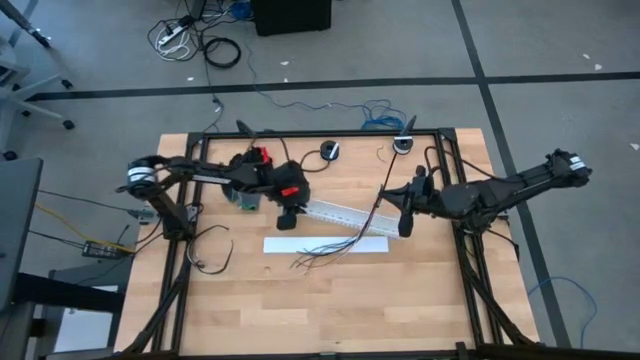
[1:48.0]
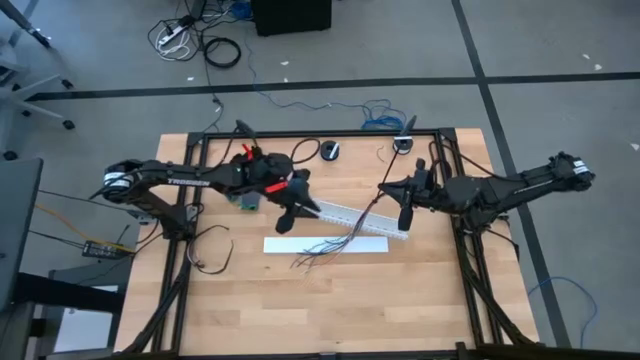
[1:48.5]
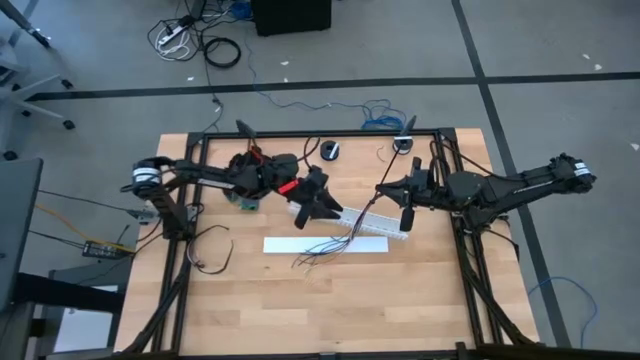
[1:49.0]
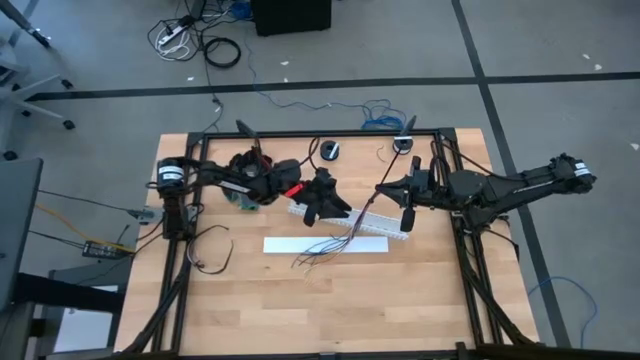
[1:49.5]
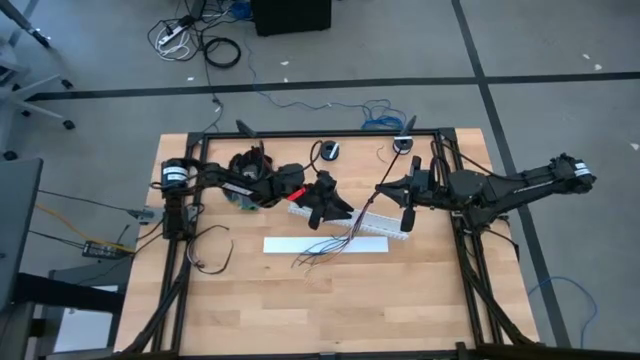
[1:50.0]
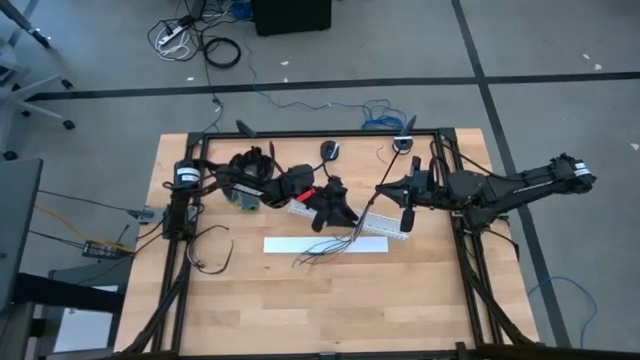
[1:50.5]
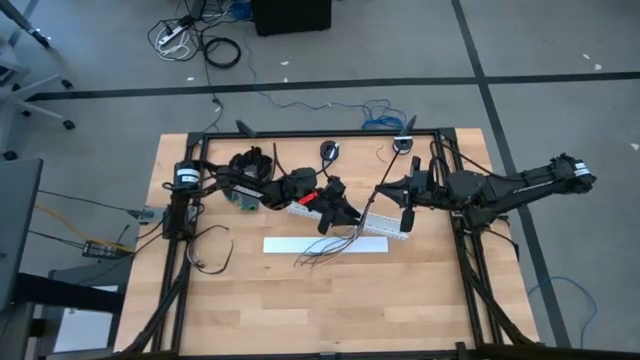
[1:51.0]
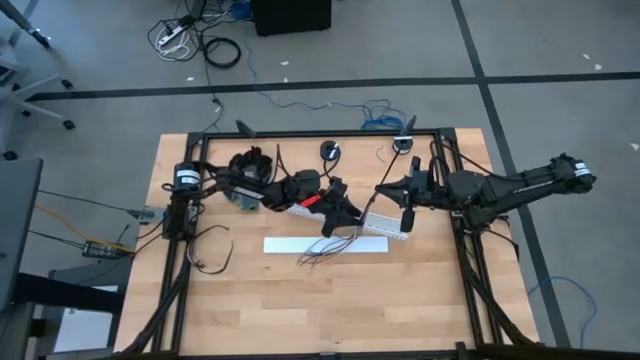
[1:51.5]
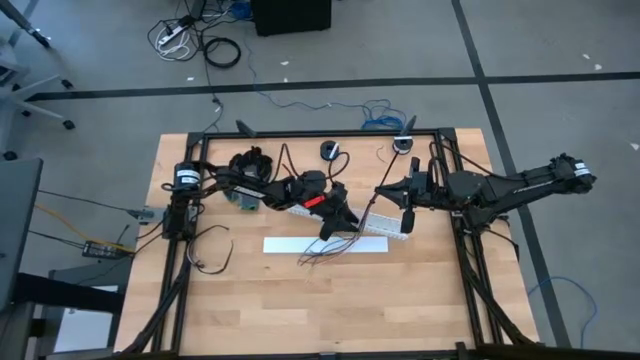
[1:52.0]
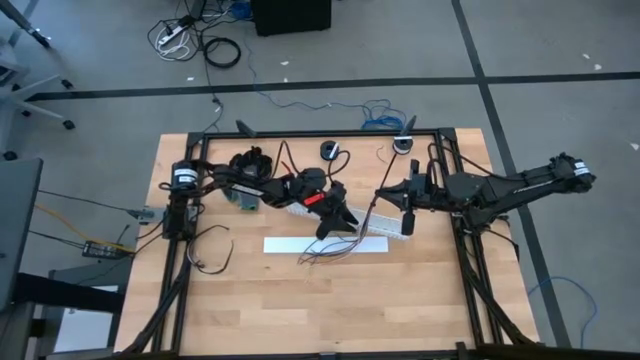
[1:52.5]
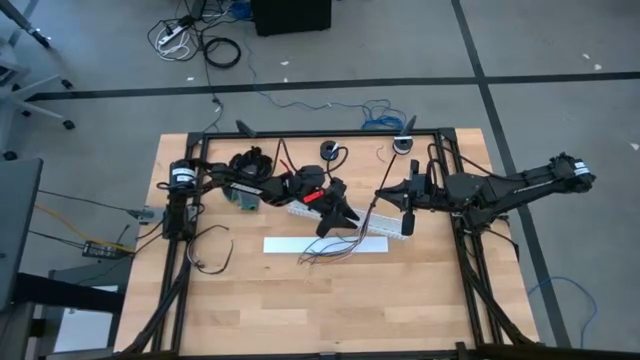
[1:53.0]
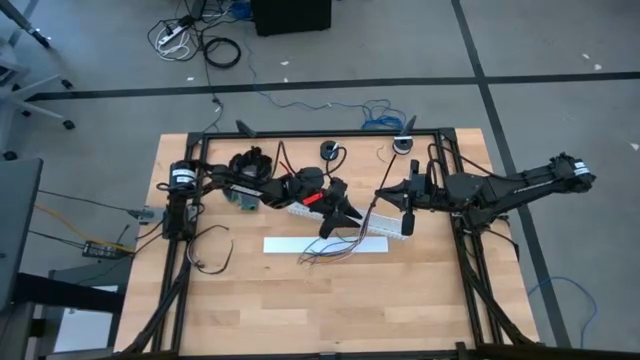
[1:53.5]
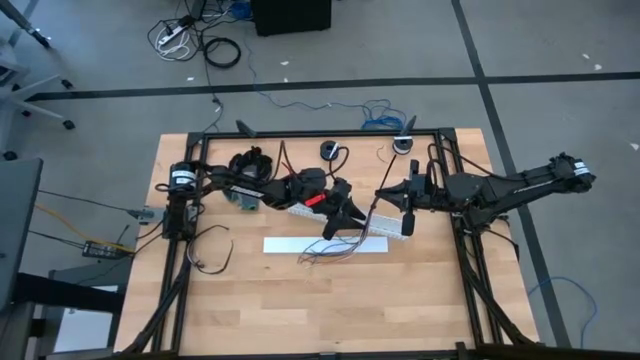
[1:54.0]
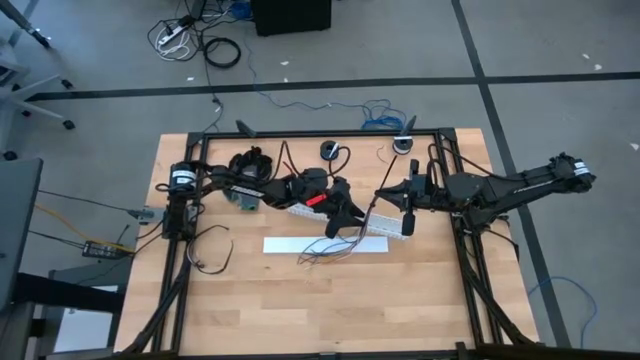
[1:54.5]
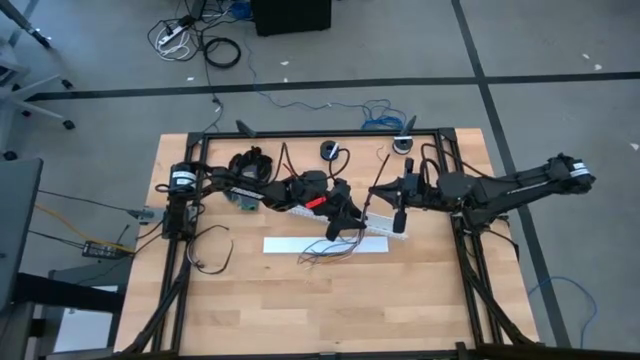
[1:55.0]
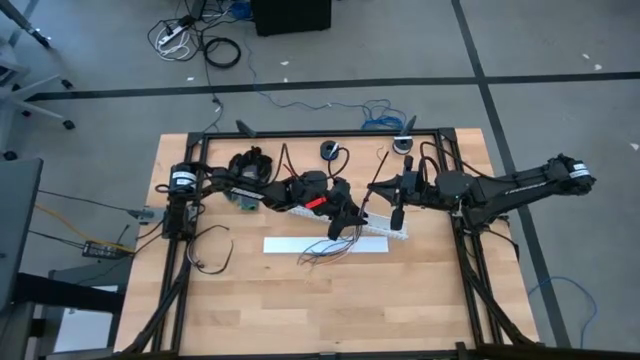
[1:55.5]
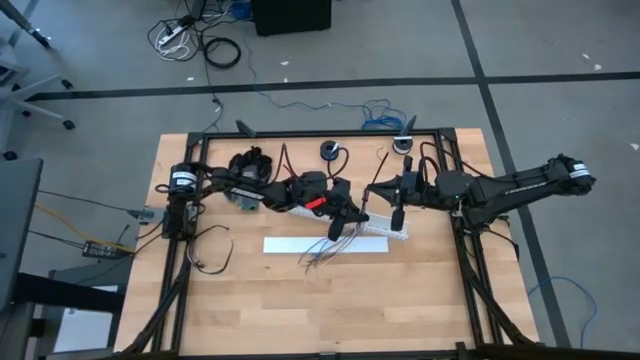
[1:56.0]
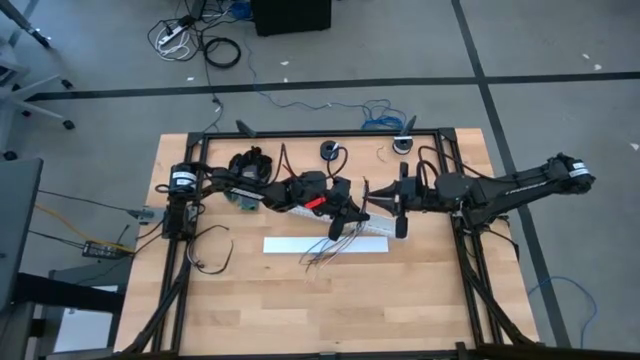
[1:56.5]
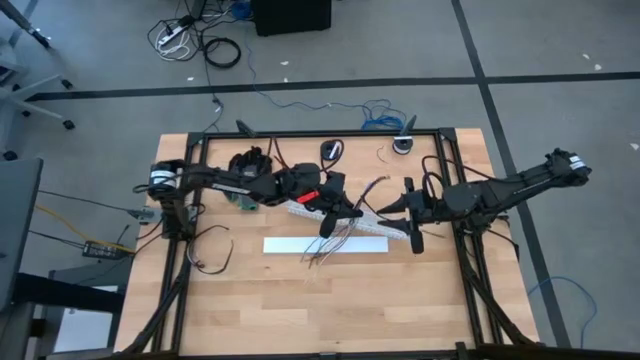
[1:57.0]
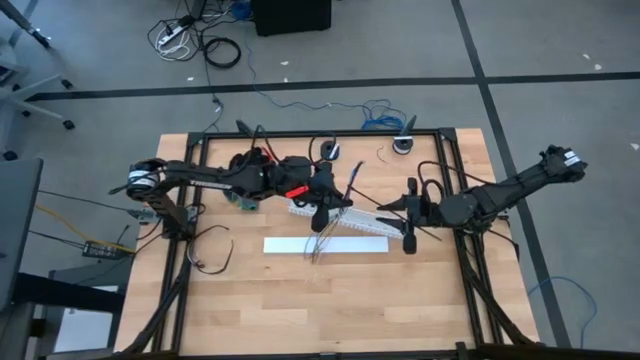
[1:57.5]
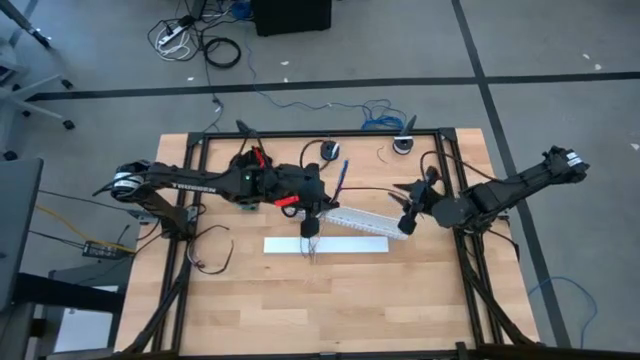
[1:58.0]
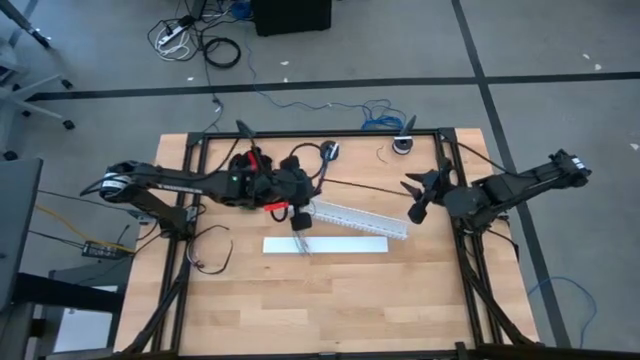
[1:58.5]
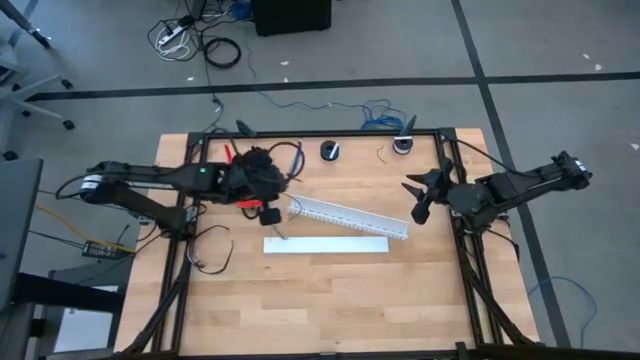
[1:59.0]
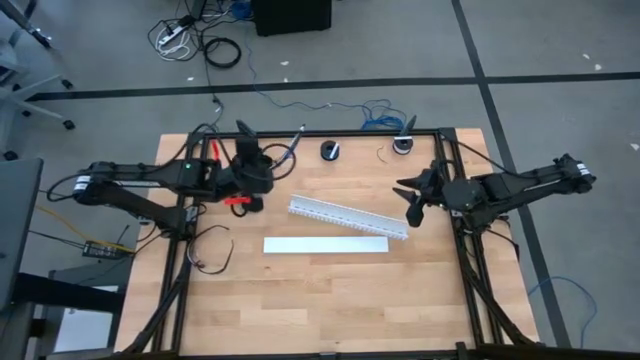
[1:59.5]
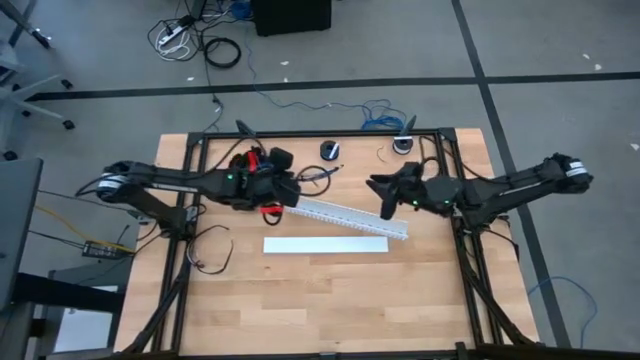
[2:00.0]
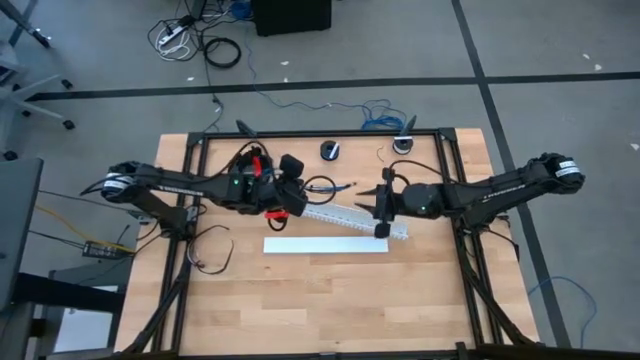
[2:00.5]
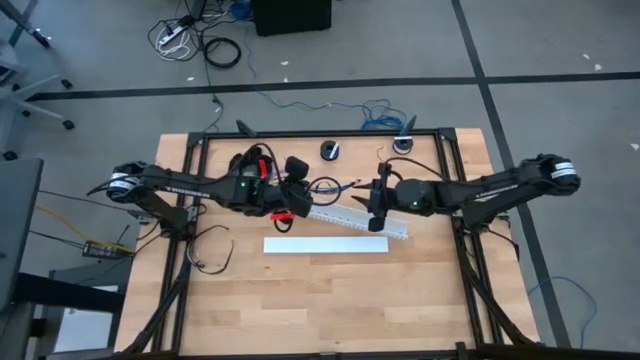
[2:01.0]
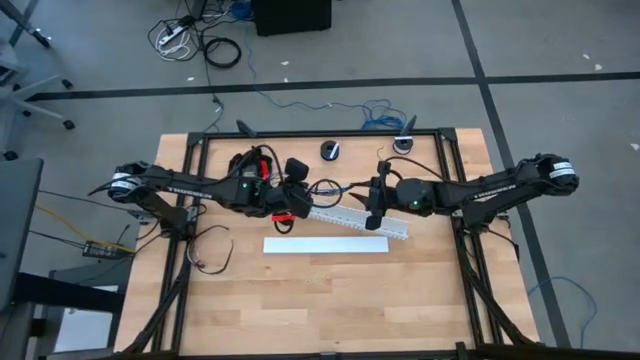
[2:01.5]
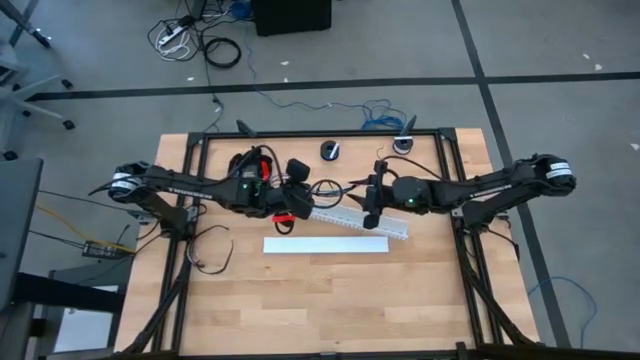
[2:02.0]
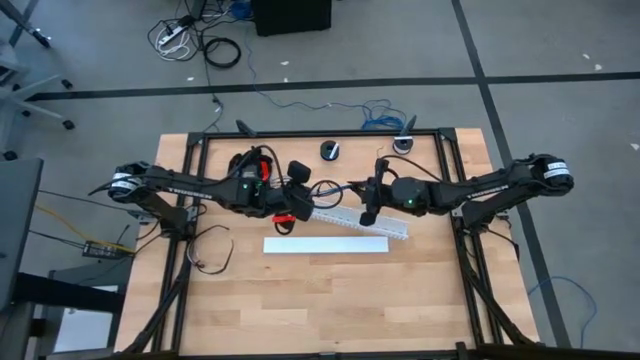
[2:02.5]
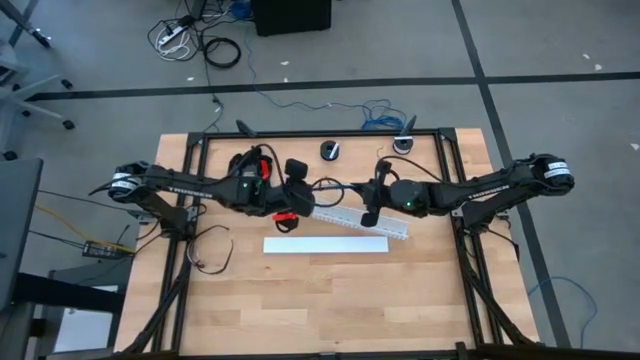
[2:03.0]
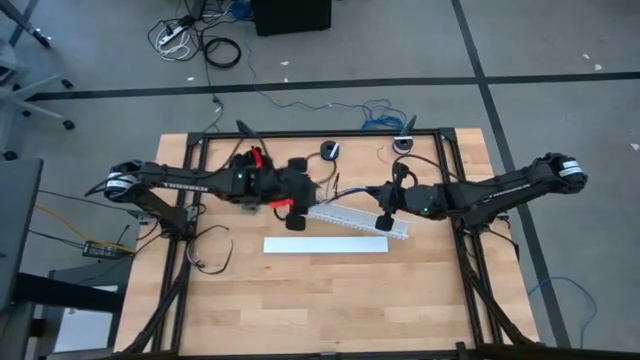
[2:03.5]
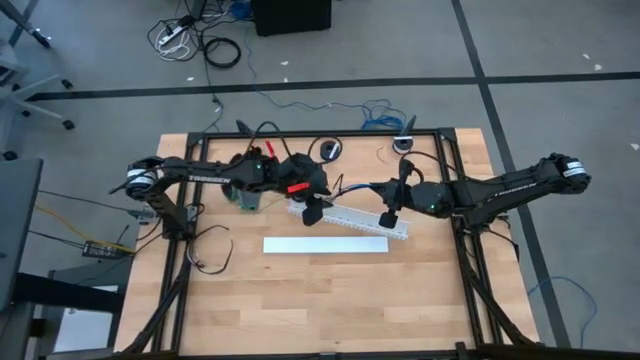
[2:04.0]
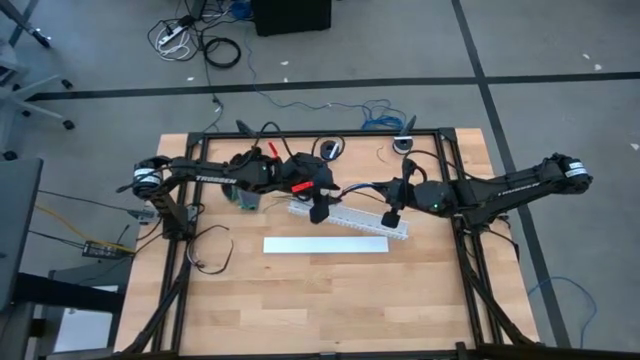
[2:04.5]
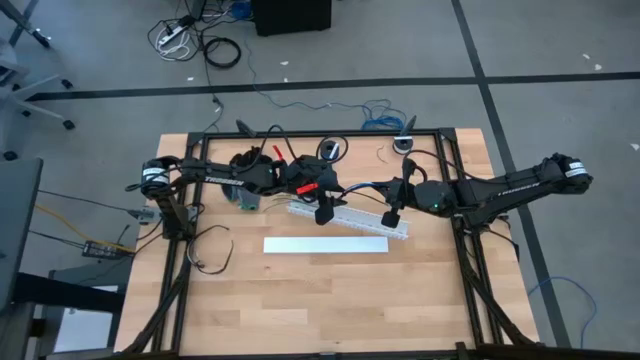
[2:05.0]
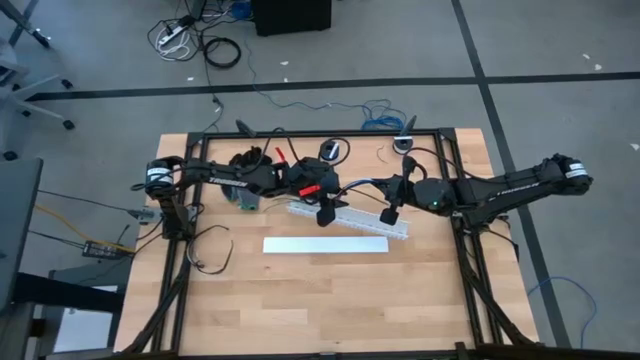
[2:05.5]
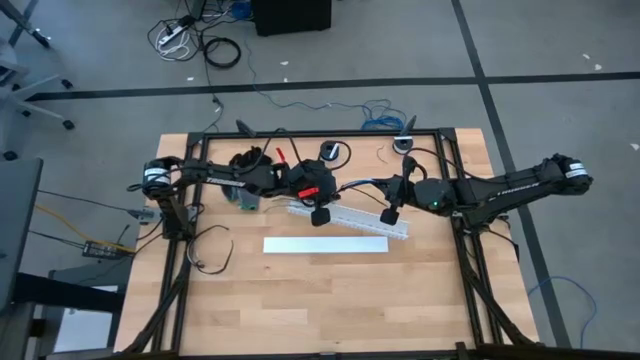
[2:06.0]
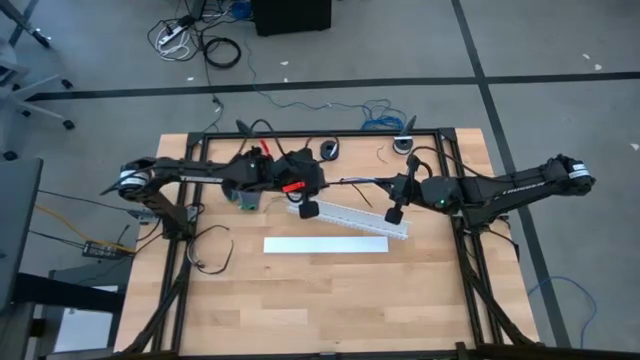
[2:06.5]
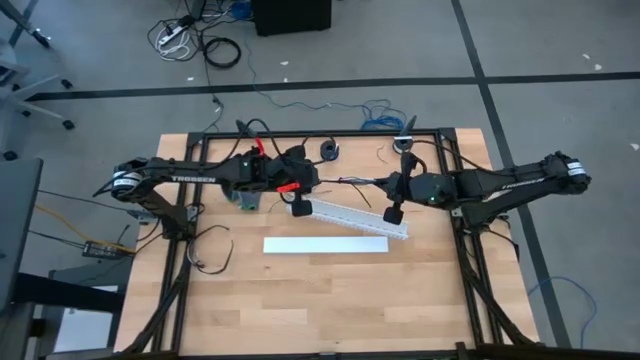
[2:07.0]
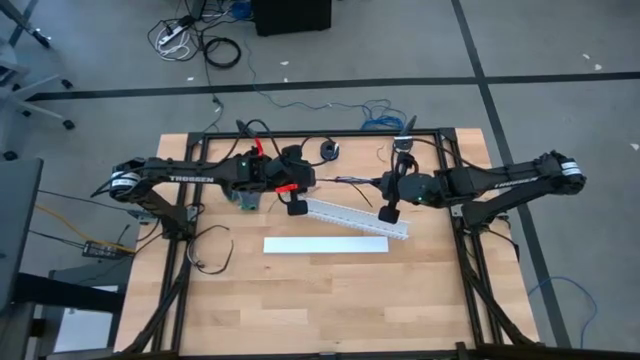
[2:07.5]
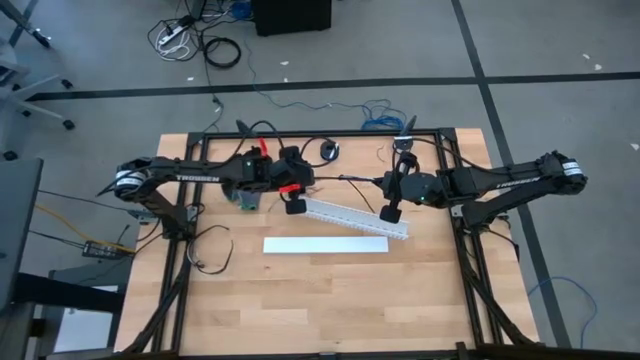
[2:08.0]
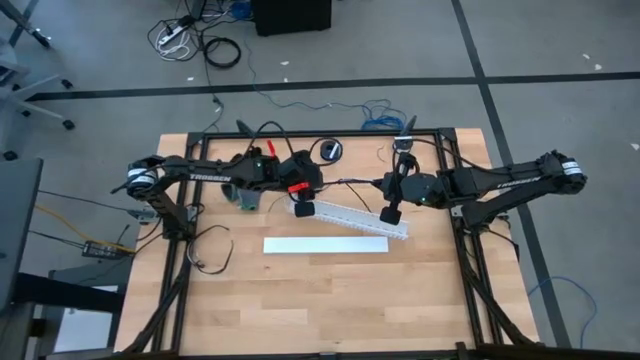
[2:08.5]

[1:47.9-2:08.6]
Task: Ziptie cables
Put the ziptied cables into the white cable duct
